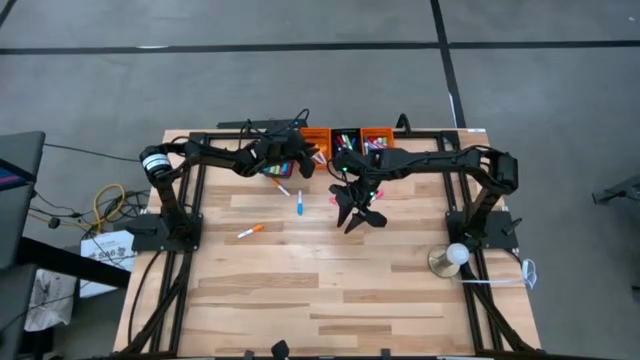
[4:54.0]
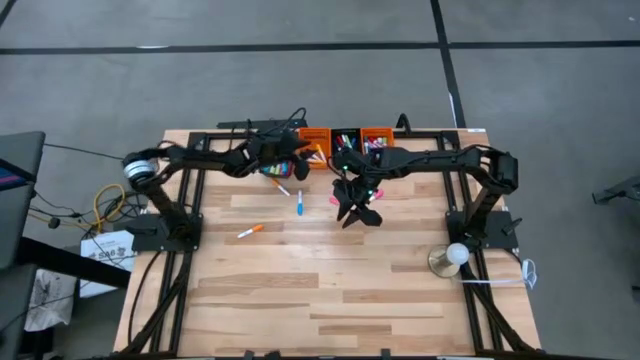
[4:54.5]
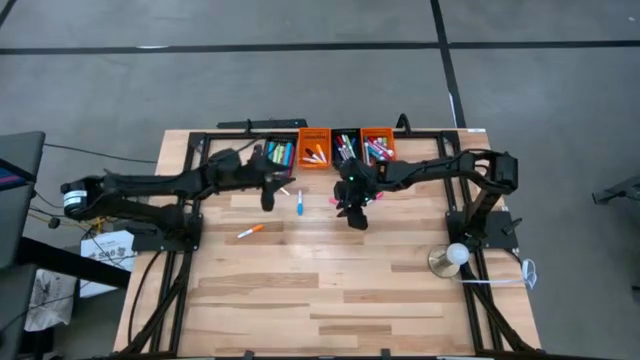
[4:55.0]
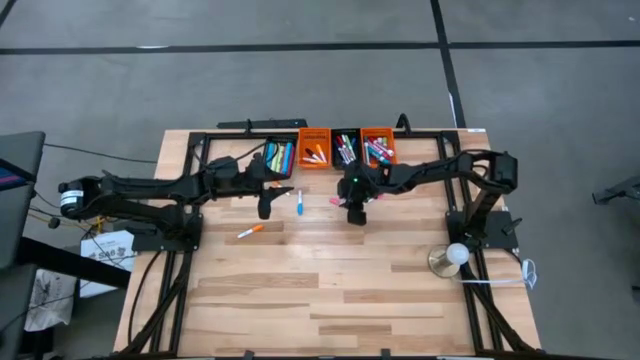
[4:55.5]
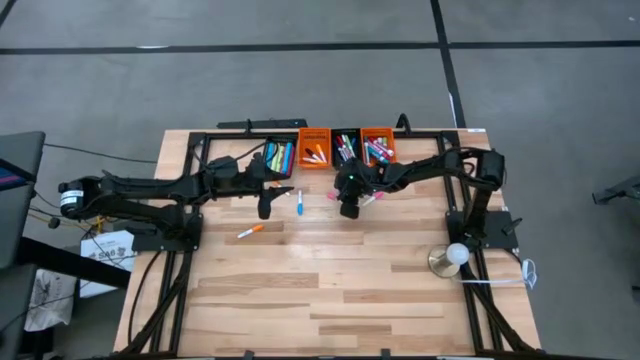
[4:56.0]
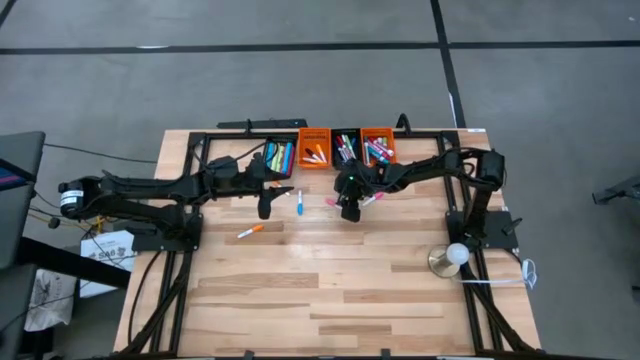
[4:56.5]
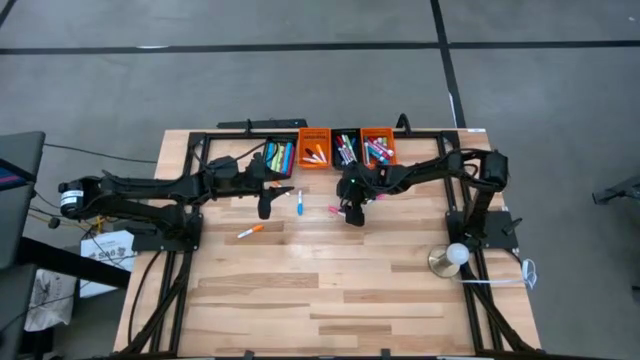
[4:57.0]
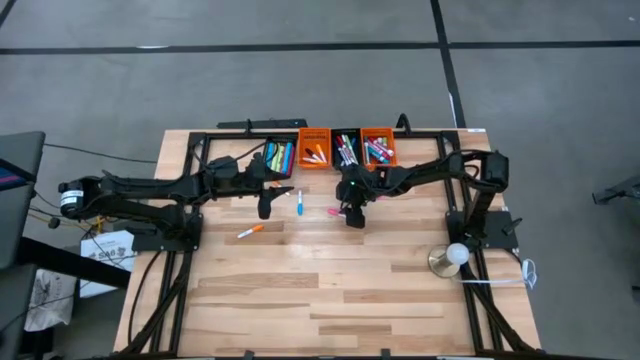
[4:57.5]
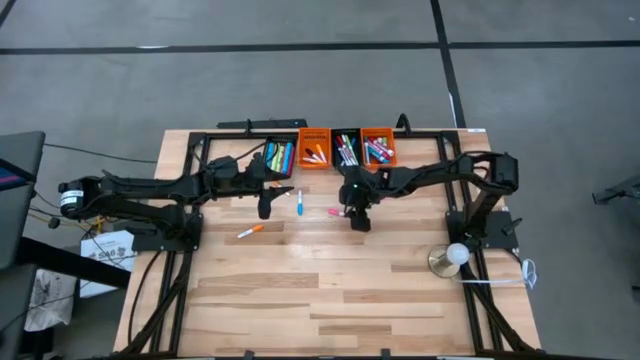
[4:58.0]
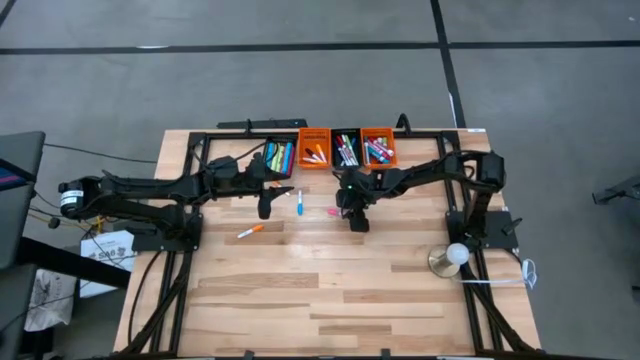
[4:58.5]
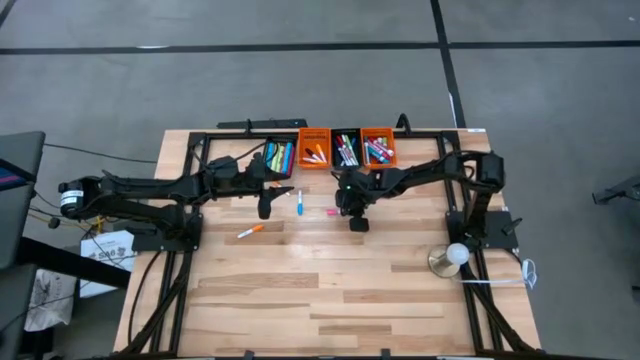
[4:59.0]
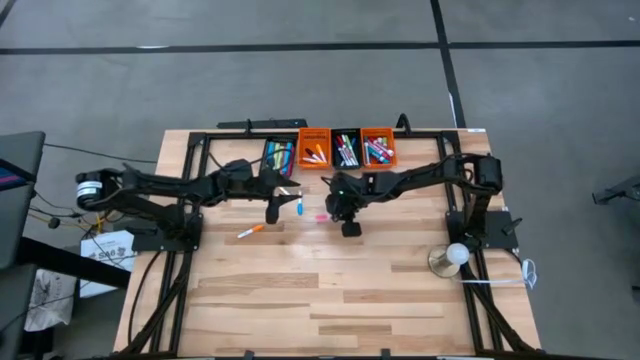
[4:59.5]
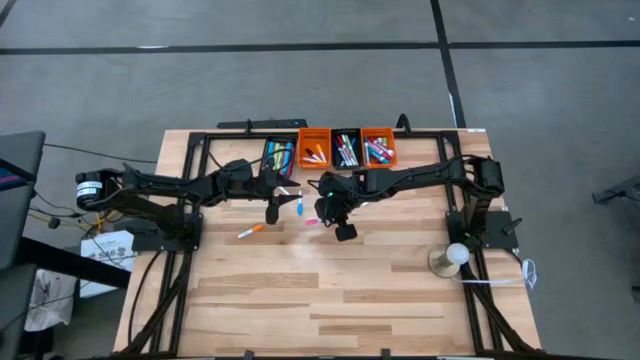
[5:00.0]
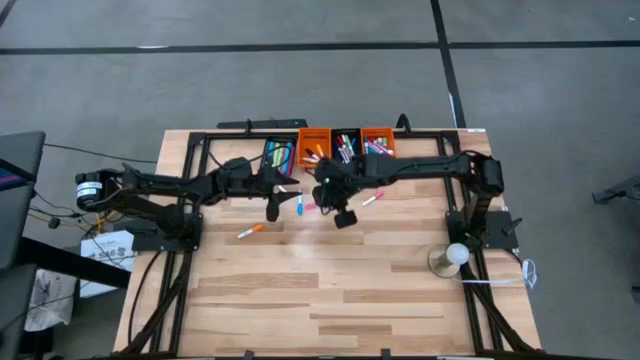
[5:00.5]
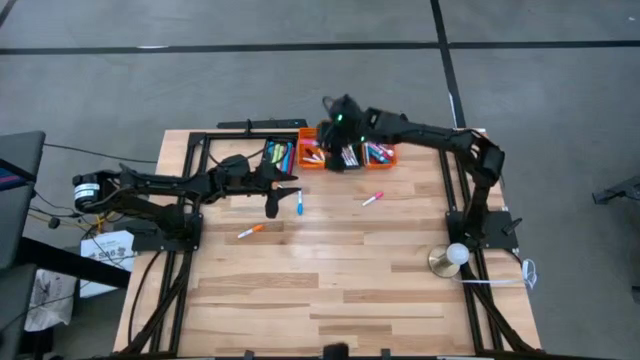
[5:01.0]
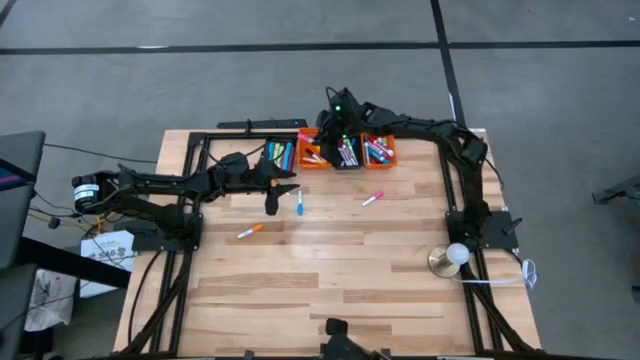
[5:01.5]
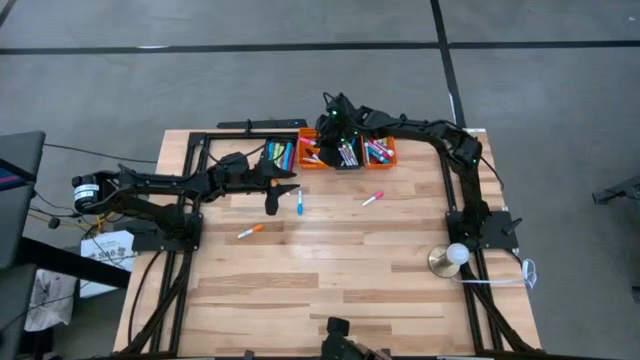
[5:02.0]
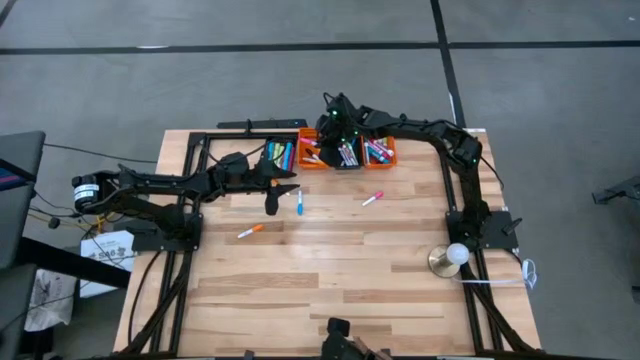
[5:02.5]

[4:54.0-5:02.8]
Task: Pick & Place Markers
Put the left small pink highlighter pen into the left orange basket

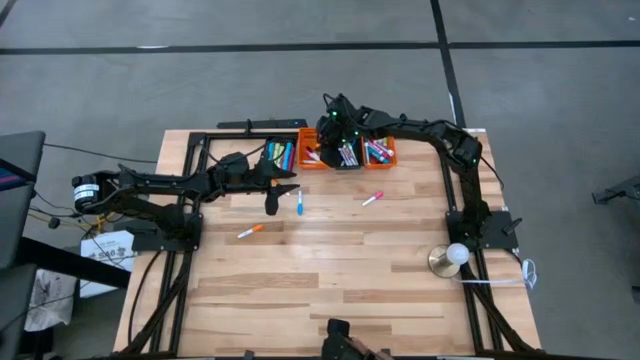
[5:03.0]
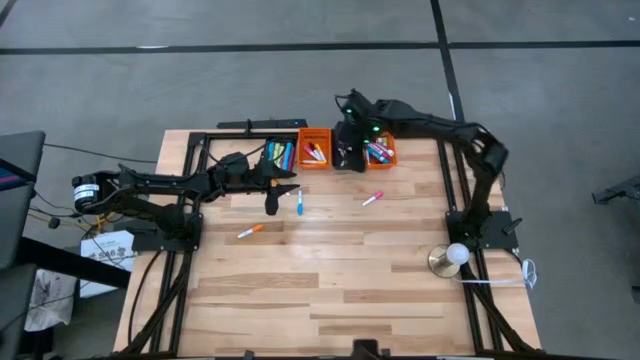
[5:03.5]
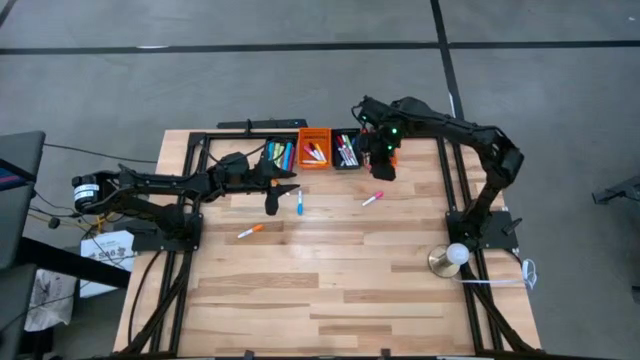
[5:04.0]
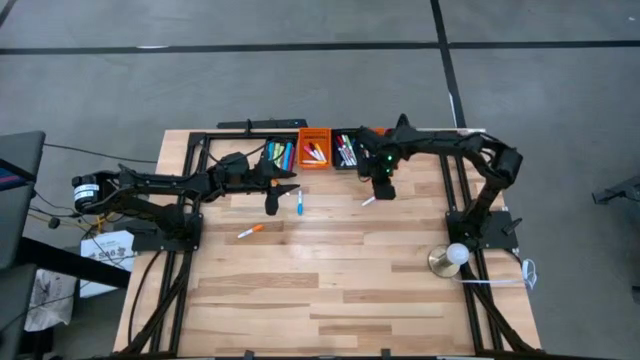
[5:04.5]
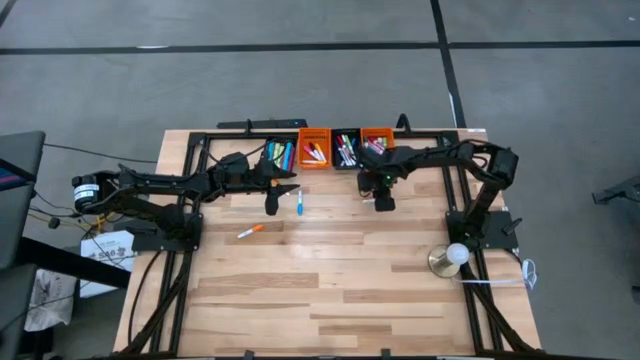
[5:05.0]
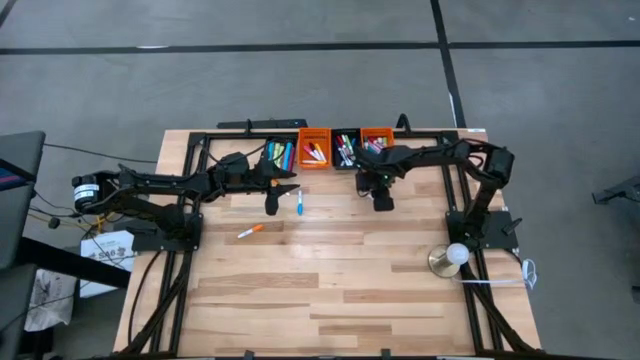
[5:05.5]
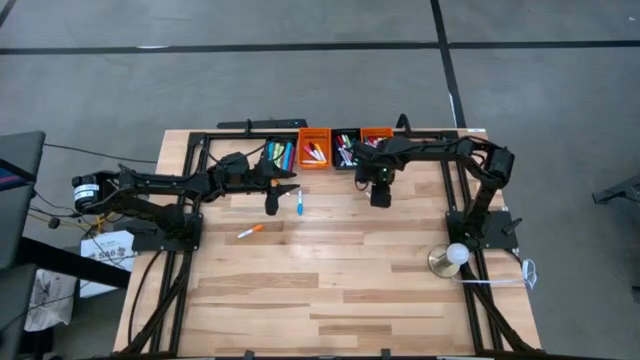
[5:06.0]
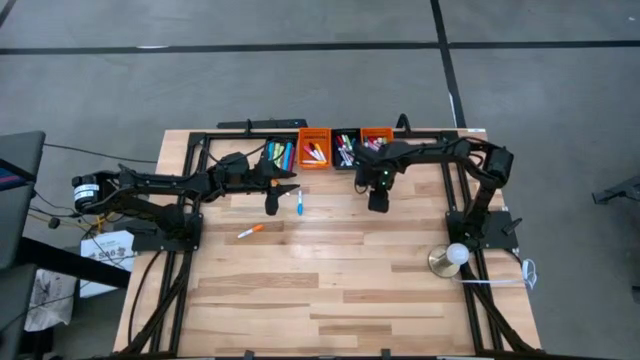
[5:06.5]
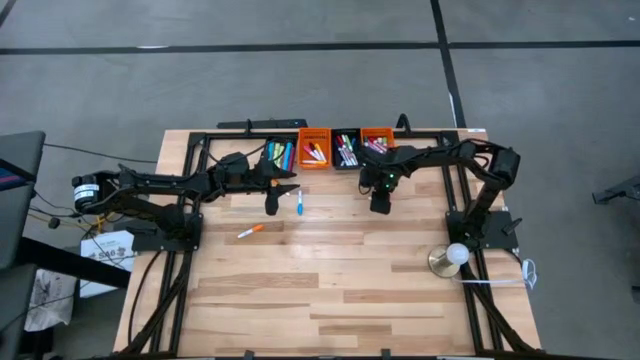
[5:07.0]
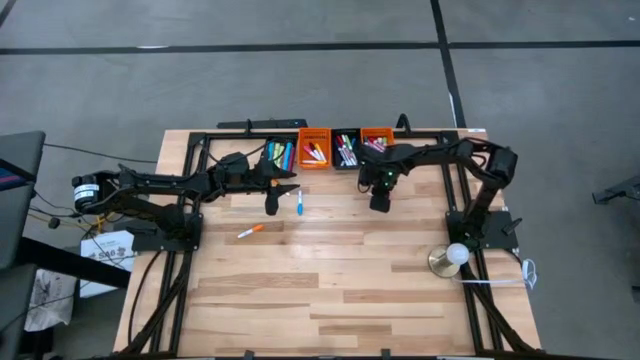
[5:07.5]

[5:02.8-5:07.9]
Put the small pink highlighter pen into the left orange basket

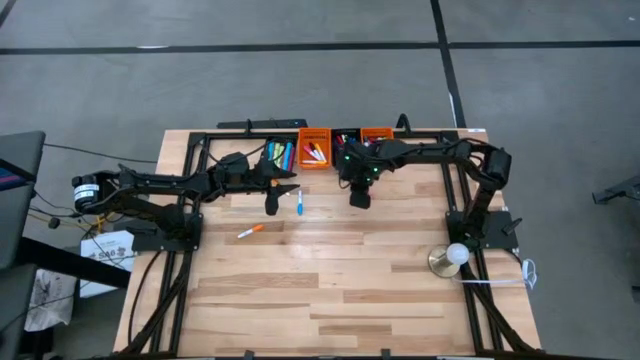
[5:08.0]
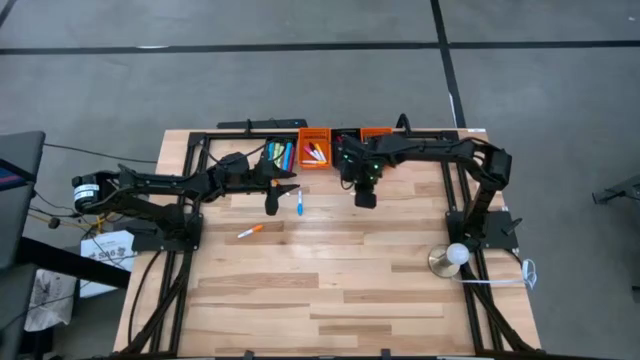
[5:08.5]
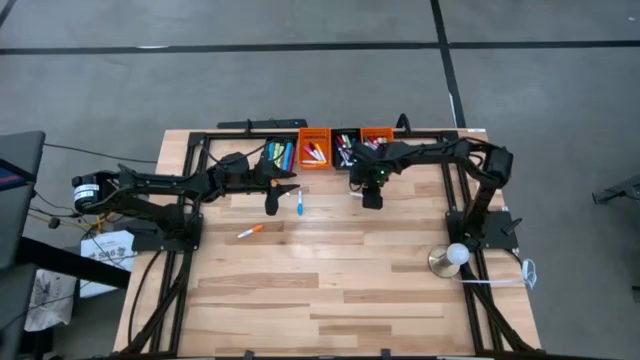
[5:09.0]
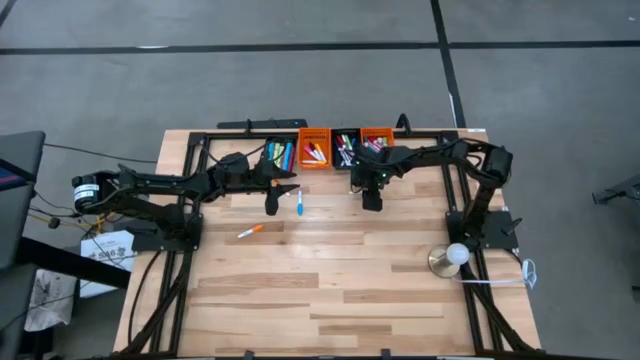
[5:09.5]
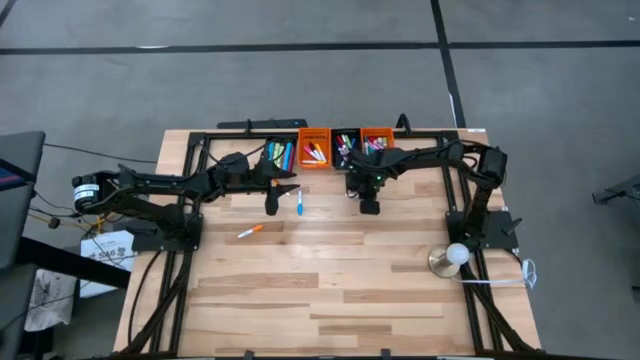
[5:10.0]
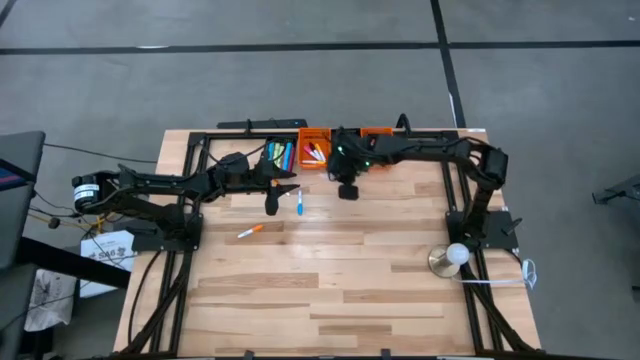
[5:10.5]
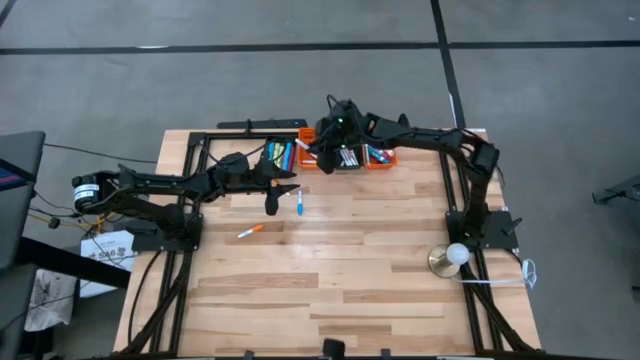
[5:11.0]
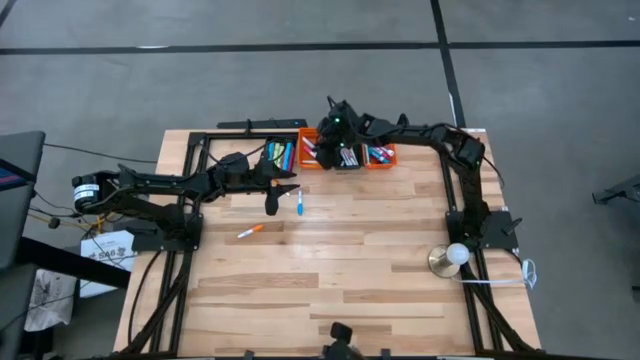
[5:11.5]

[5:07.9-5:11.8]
Put the small pink highlighter pen into the left orange basket

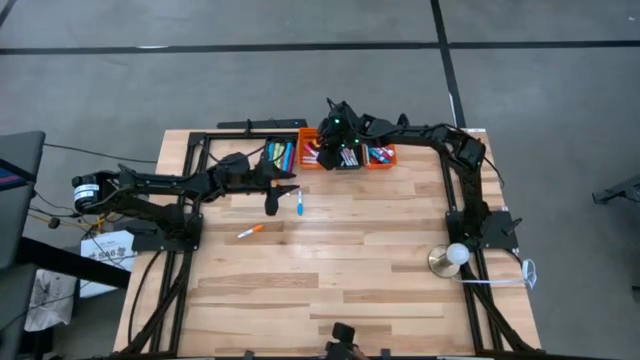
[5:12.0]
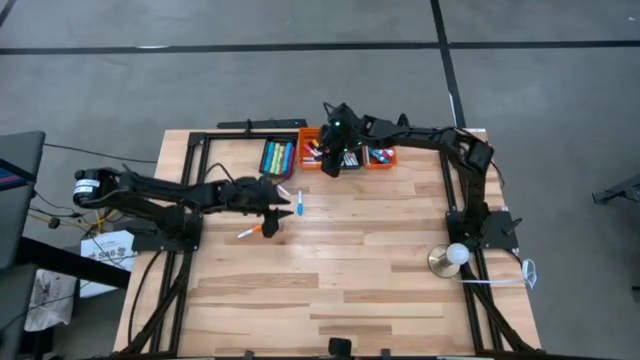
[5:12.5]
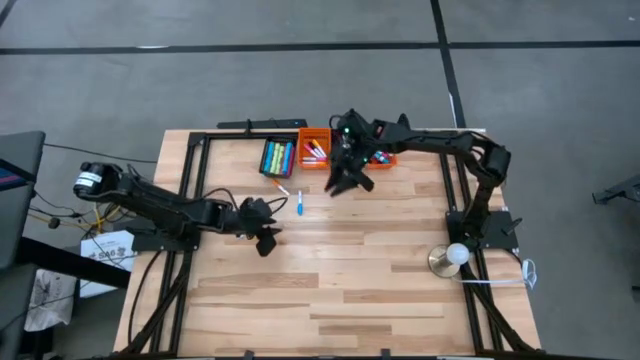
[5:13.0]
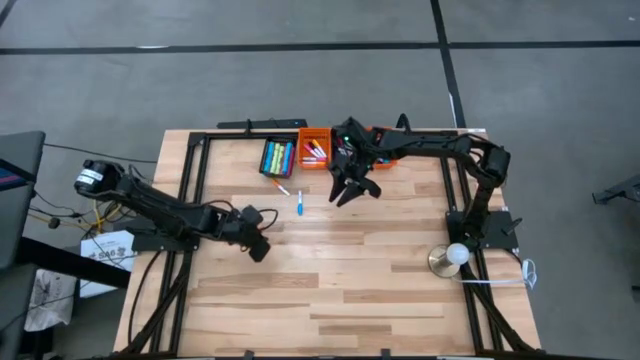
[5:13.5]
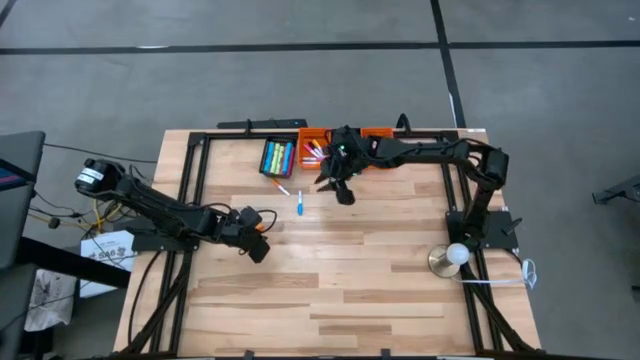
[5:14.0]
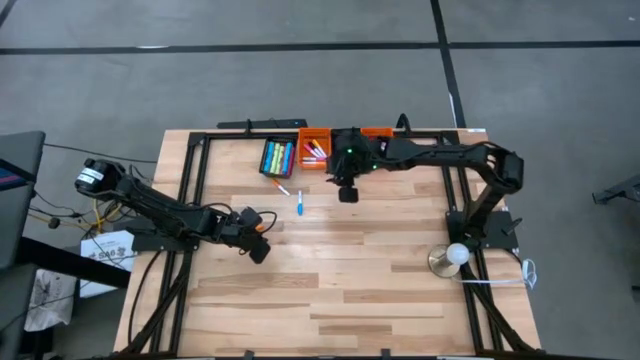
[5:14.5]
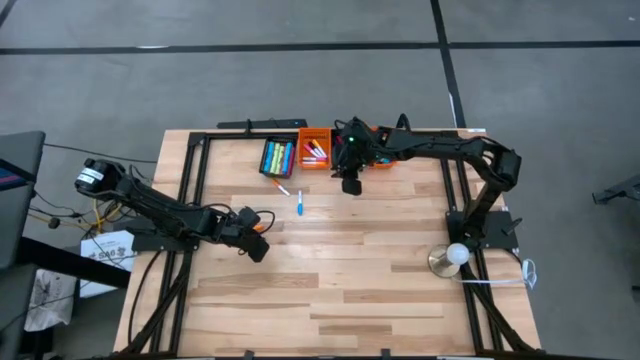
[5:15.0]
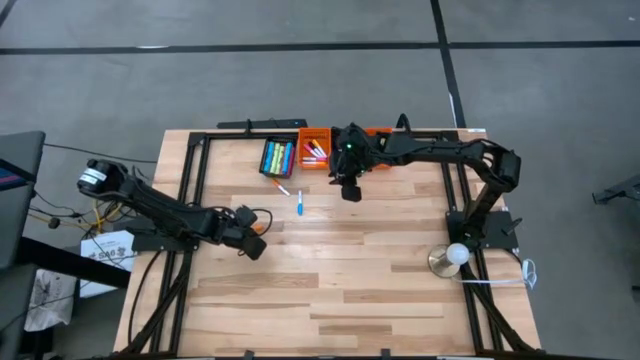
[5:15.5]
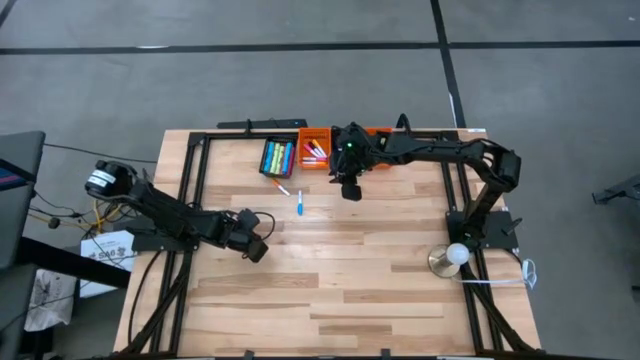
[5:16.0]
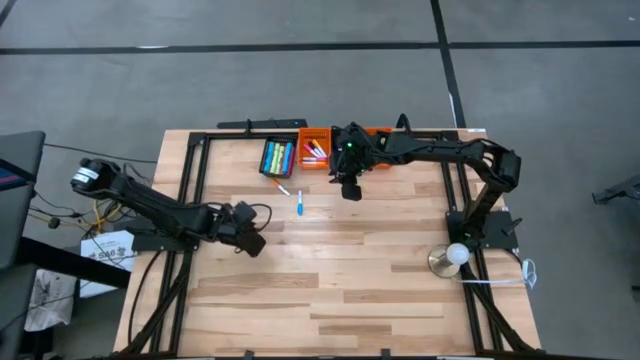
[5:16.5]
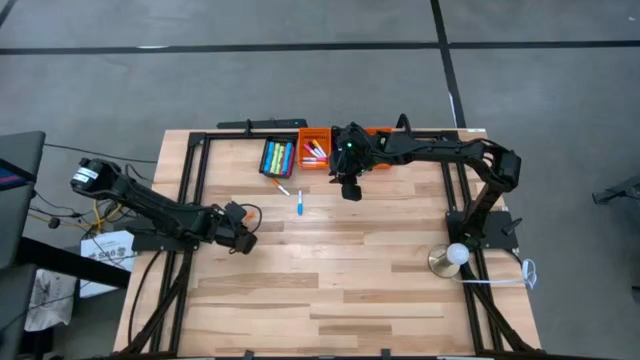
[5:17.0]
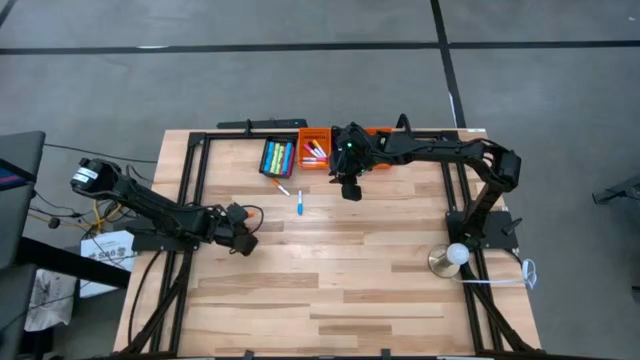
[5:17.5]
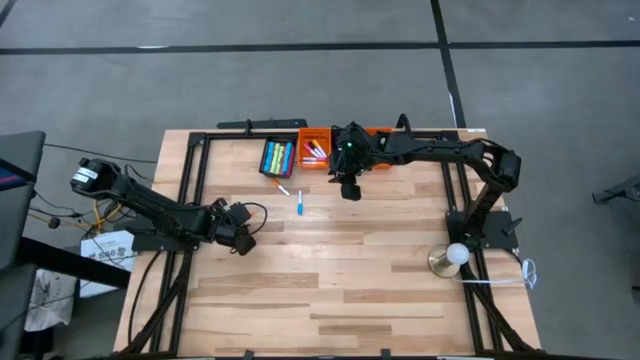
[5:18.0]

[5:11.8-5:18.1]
Put the small orange highlighter pen into the left orange basket
